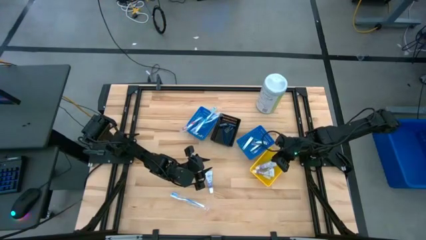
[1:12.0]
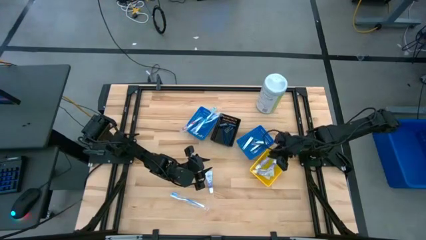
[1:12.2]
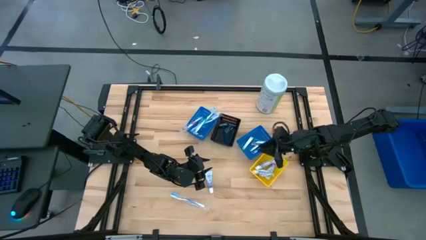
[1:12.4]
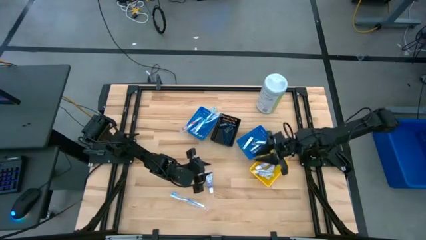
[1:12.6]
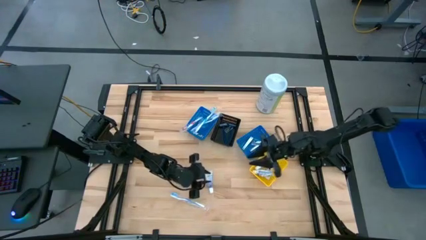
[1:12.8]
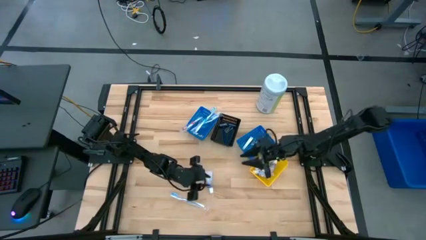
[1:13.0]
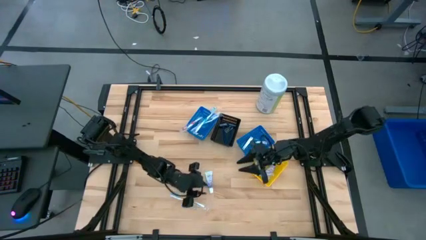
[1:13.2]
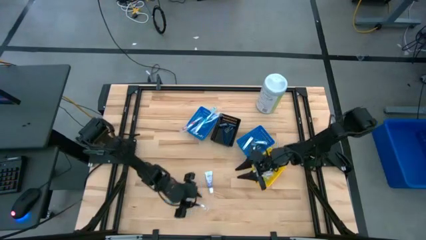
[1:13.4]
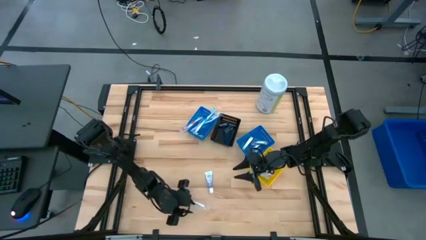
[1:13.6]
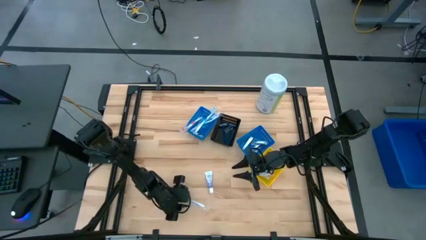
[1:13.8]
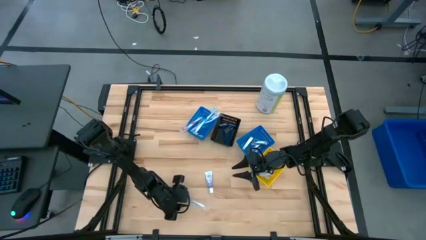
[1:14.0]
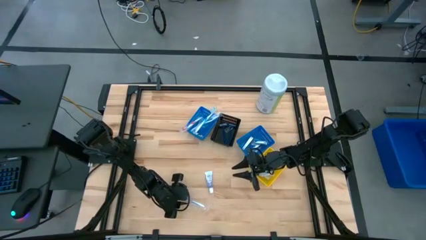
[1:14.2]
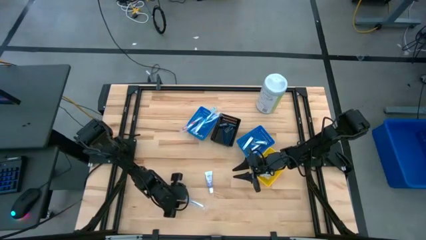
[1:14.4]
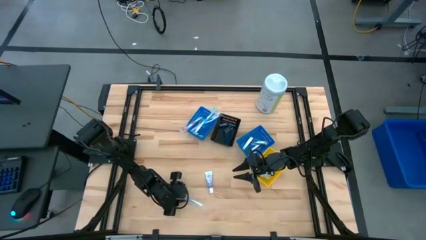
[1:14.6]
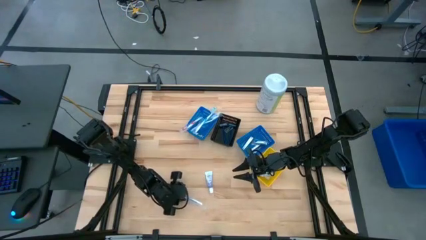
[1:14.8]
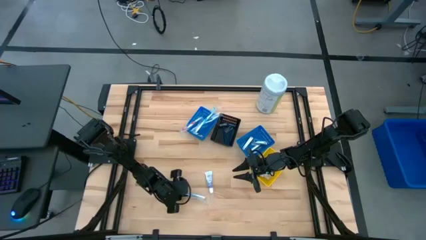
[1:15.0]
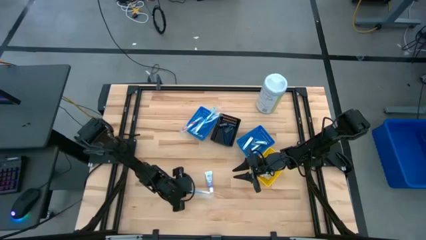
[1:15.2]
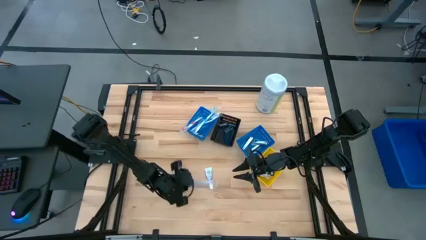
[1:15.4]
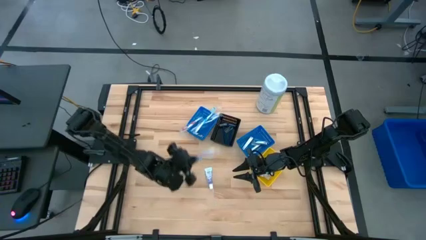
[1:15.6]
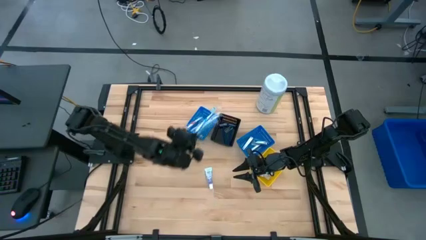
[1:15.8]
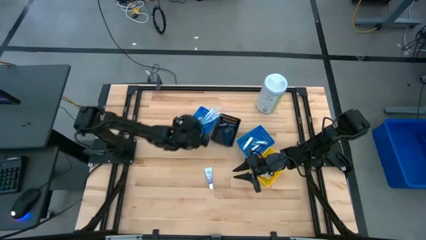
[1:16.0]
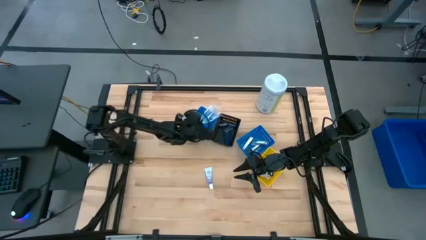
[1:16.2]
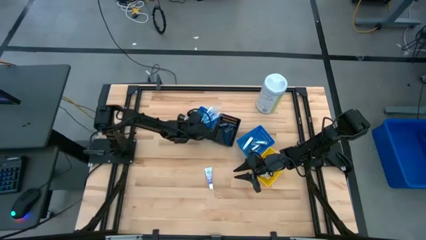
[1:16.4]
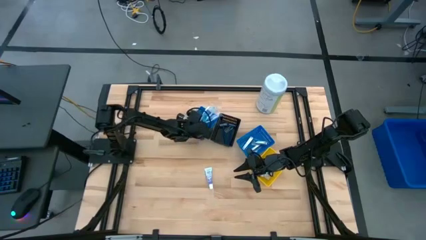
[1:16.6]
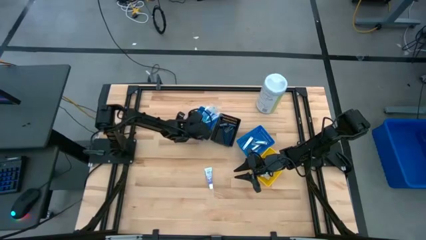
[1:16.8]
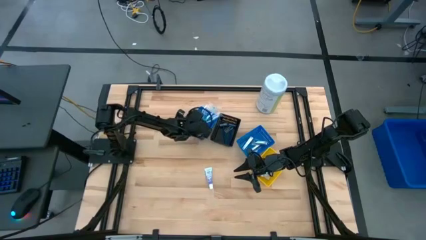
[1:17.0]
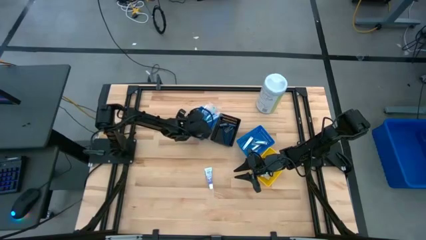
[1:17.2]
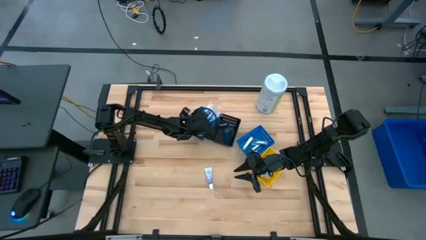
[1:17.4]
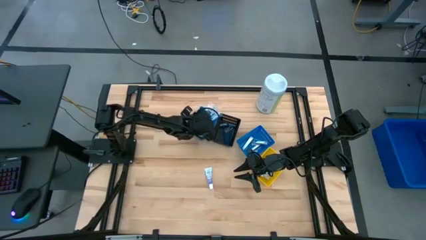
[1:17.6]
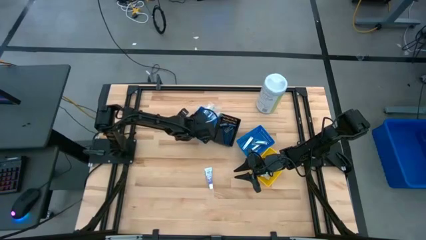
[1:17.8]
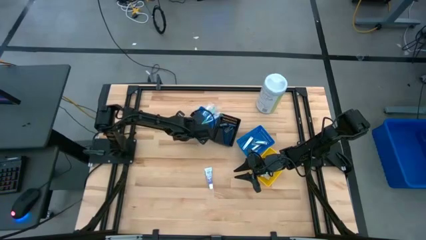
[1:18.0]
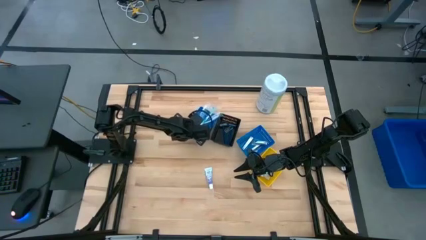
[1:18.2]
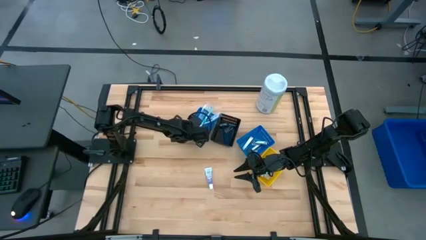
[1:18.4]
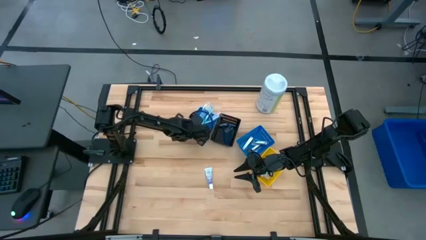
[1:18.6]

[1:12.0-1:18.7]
Task: Pick & Place Travel size toiletries
Put the blue toothbrush into the left blue basket

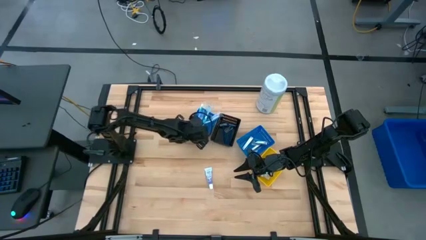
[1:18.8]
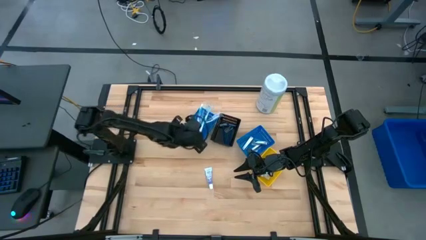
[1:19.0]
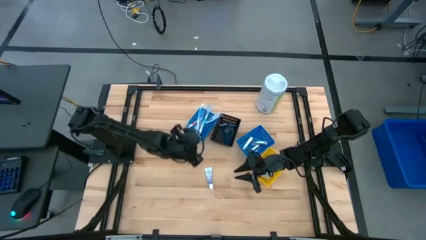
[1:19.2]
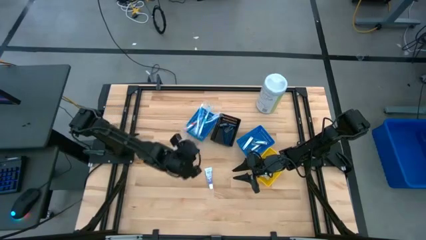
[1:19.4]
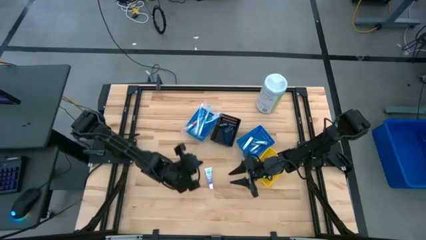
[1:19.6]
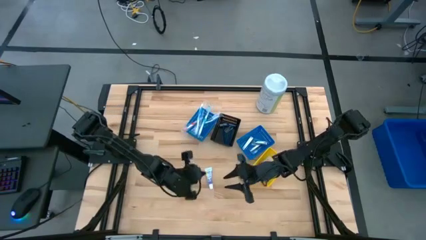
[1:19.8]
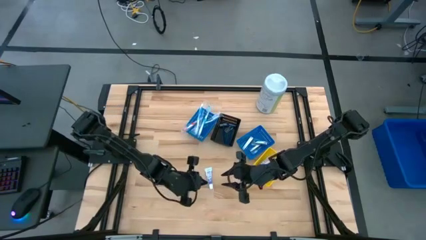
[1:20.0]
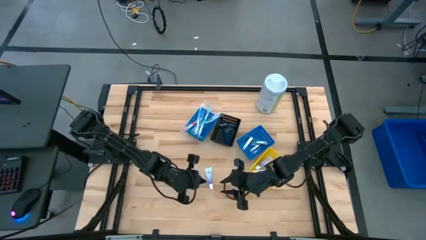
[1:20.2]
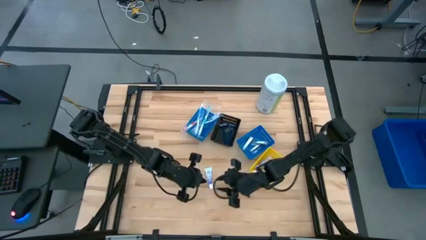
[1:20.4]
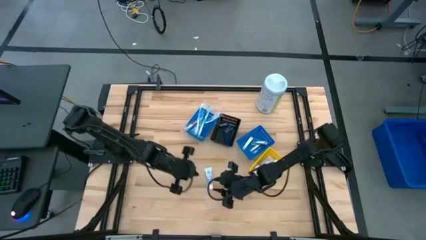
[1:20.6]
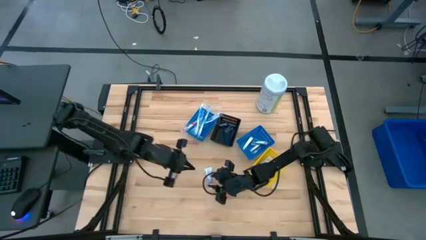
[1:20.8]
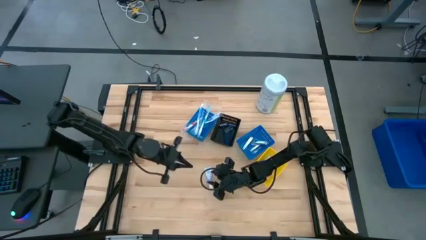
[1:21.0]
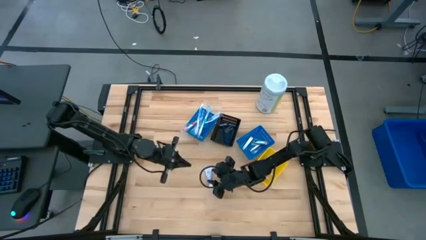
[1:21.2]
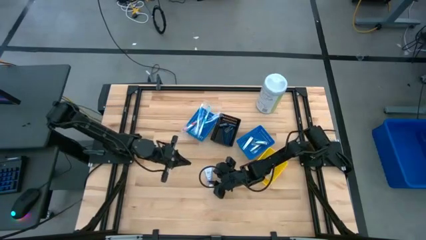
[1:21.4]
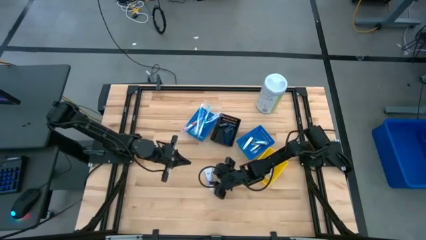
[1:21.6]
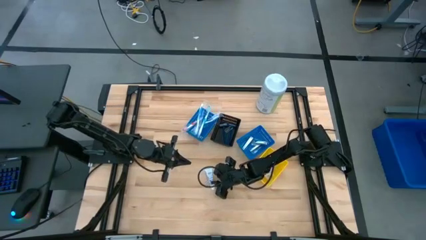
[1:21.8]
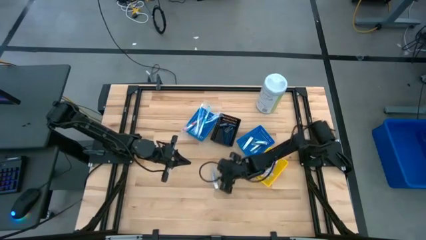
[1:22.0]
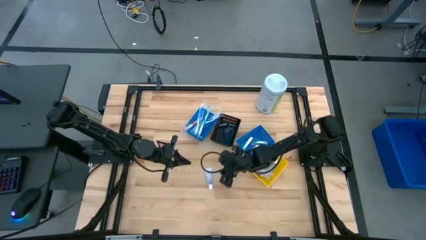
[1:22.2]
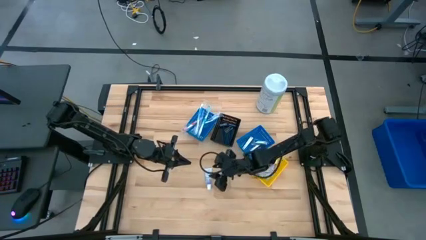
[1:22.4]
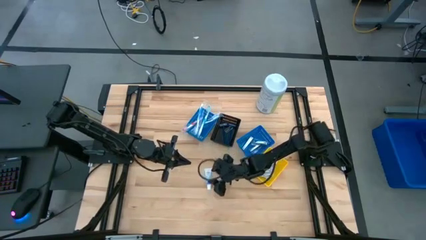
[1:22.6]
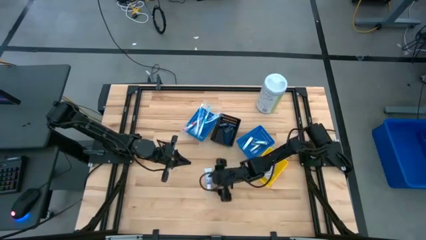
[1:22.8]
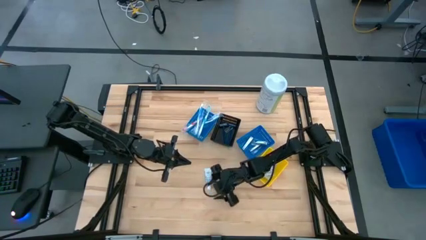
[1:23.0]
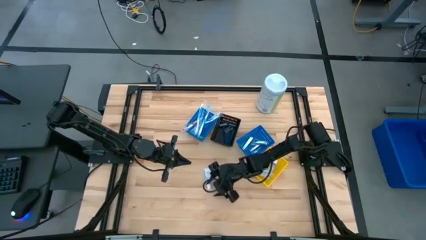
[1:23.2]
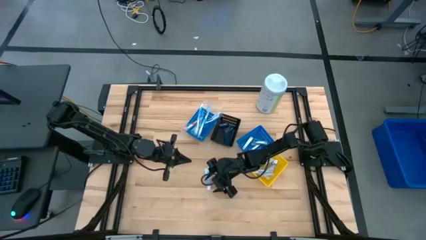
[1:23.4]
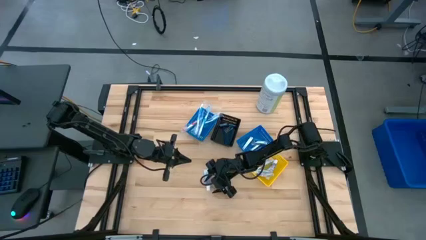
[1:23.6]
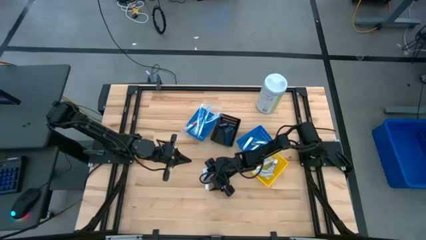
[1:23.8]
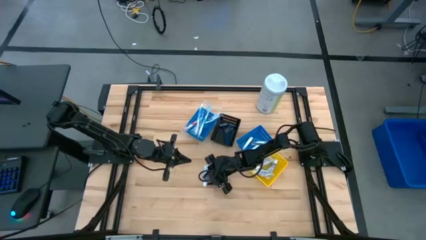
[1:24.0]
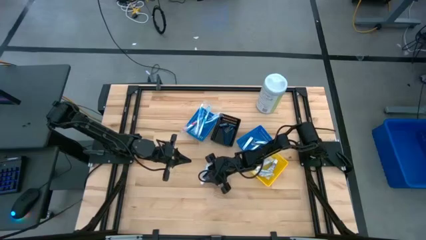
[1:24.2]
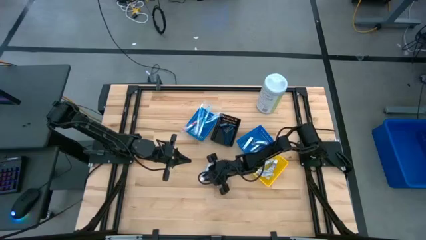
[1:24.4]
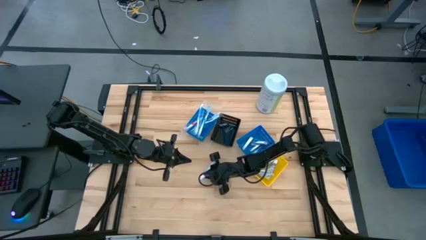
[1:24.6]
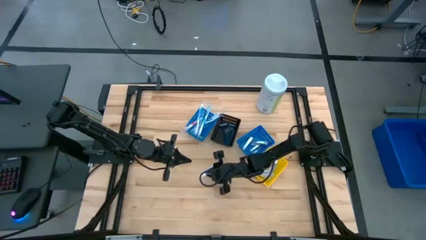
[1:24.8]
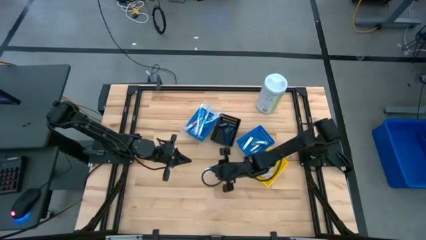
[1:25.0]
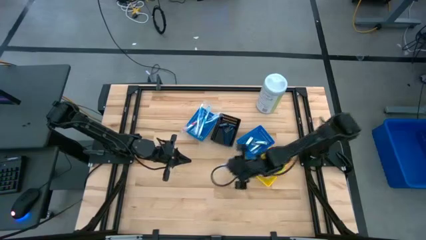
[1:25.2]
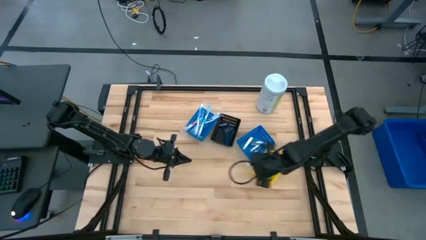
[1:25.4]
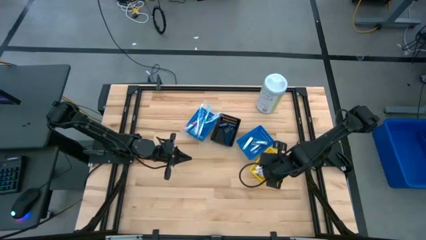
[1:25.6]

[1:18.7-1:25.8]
Put the toothpaste into the yellow basket

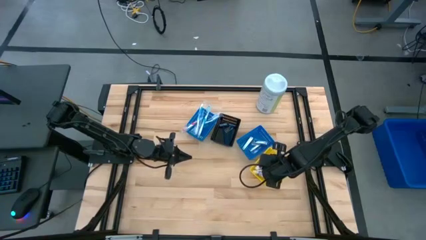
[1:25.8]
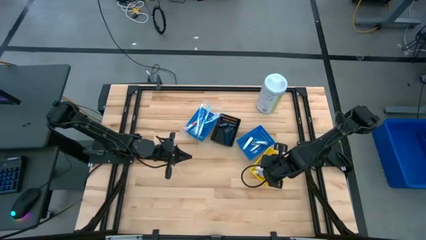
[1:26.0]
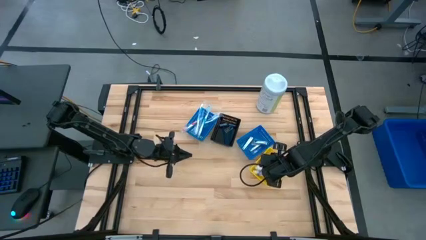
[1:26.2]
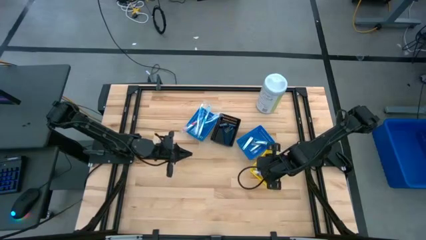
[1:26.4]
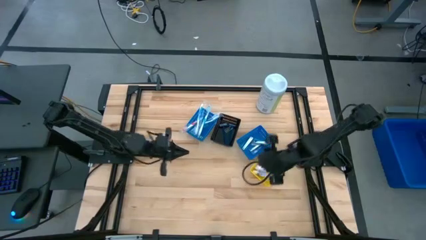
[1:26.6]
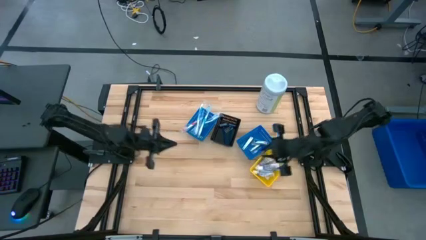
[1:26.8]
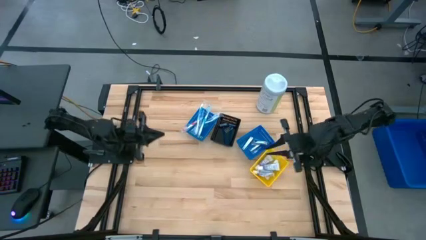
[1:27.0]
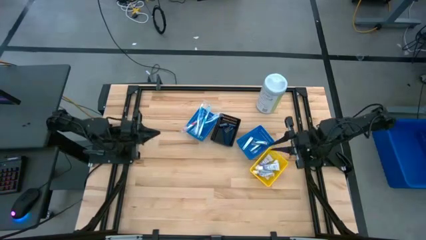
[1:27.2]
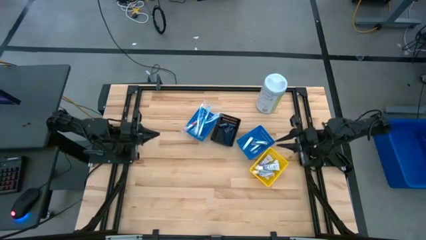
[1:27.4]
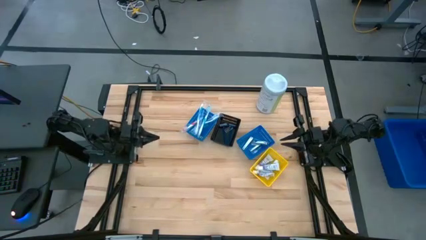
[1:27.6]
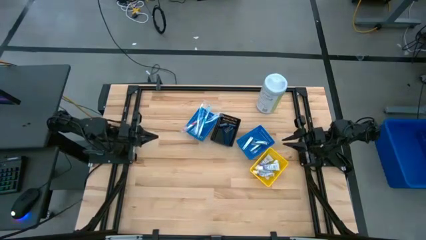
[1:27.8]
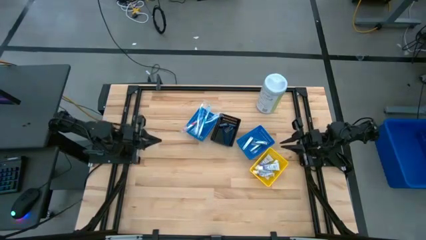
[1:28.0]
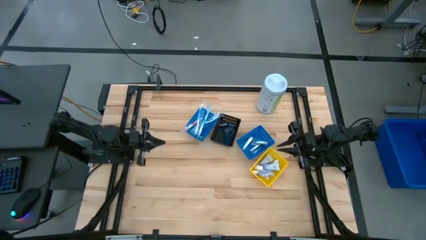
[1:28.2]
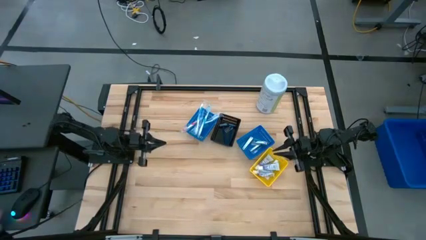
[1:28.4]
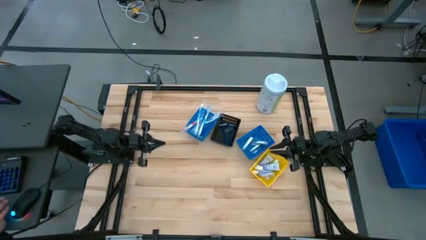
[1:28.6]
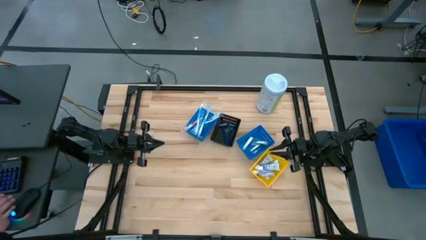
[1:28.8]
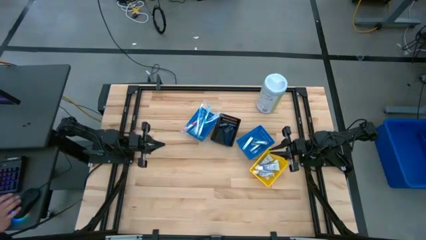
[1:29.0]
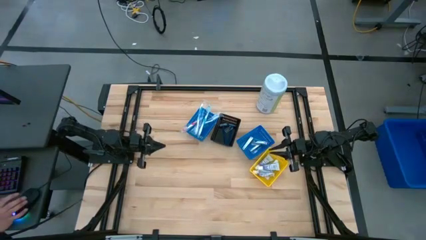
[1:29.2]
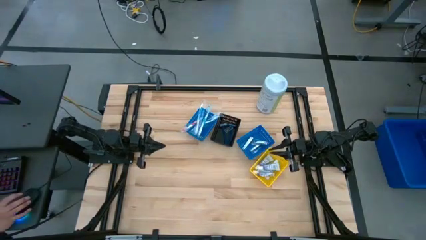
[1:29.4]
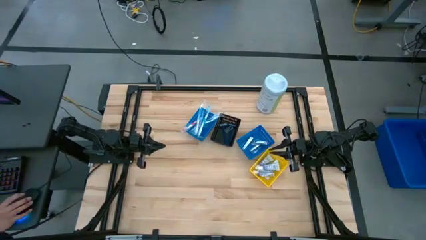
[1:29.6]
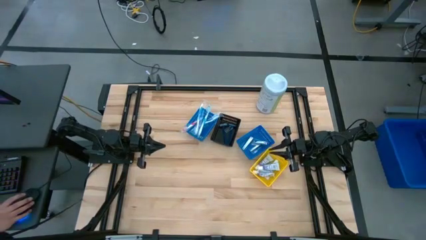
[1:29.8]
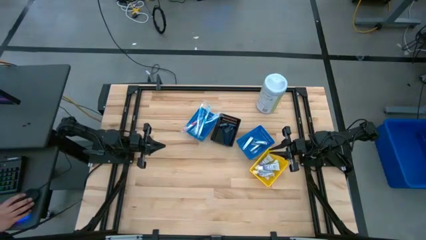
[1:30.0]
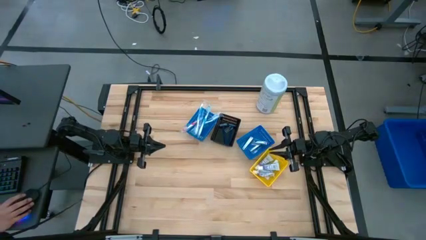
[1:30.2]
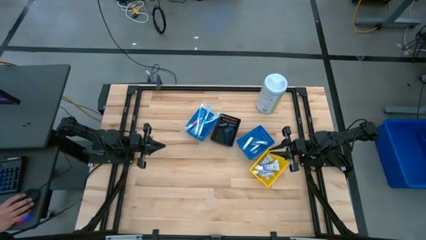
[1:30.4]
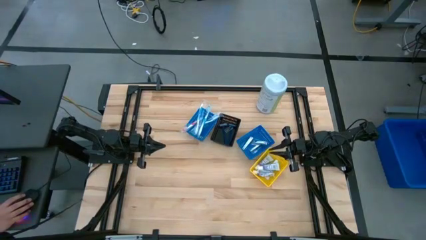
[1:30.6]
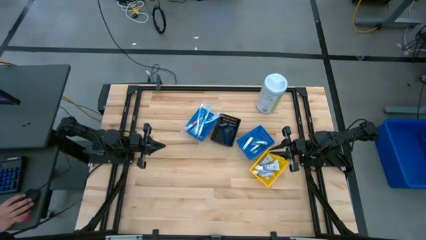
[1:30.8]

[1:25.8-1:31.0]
Return to Home Position
